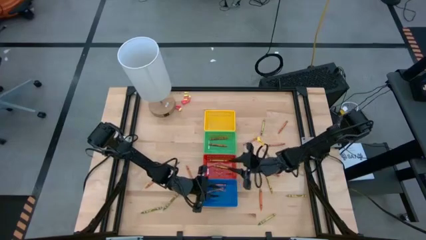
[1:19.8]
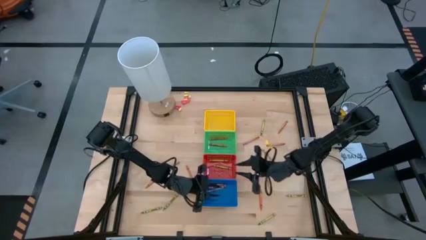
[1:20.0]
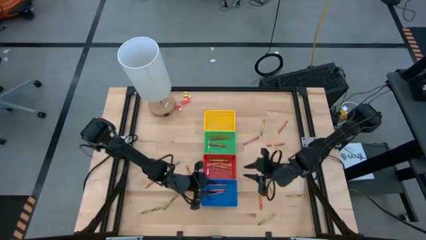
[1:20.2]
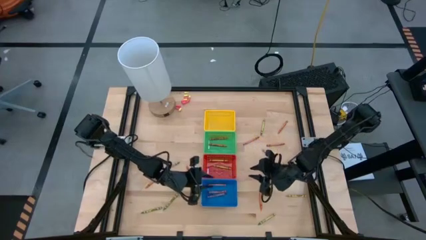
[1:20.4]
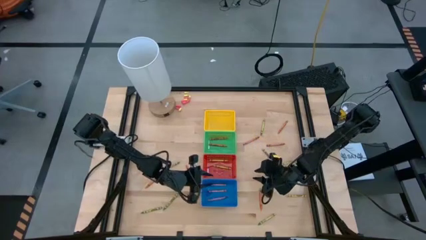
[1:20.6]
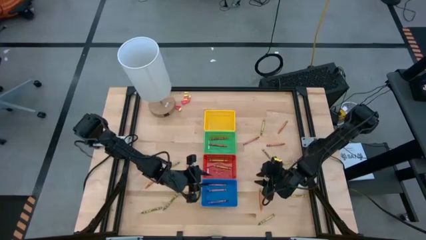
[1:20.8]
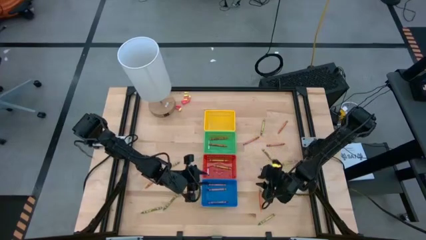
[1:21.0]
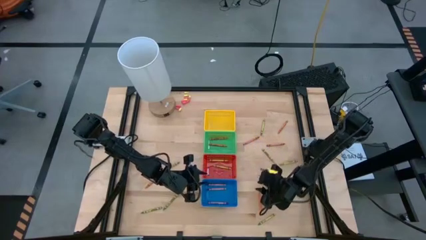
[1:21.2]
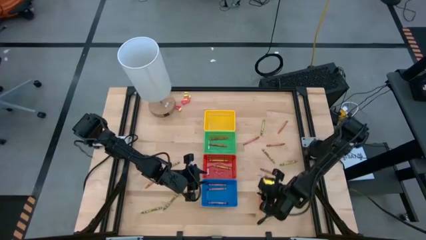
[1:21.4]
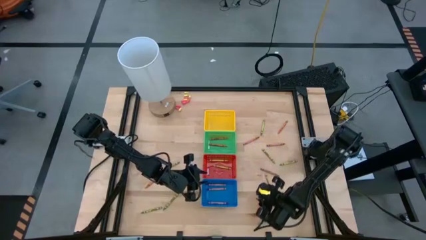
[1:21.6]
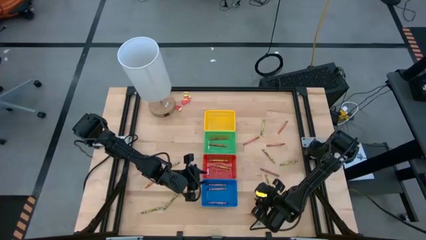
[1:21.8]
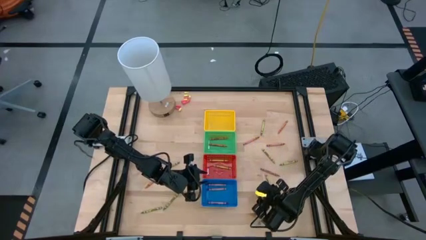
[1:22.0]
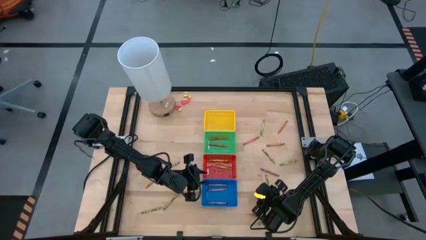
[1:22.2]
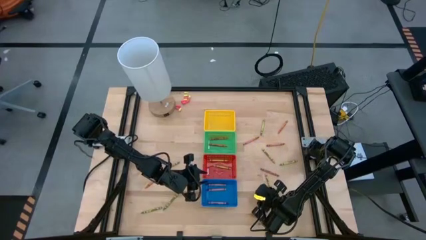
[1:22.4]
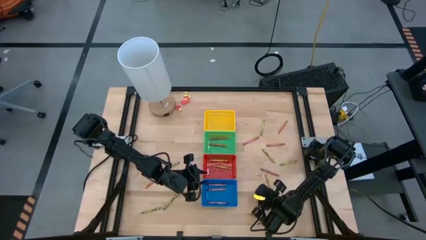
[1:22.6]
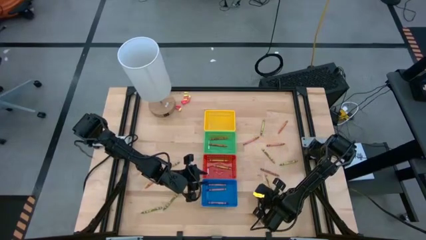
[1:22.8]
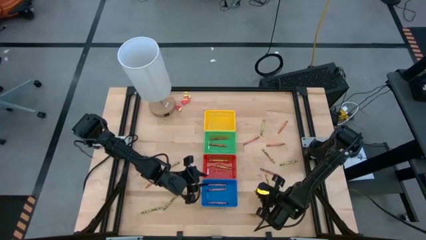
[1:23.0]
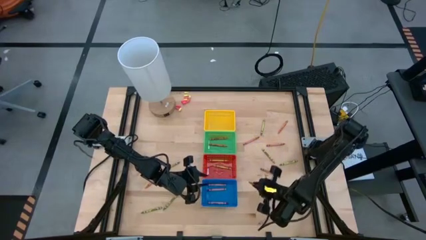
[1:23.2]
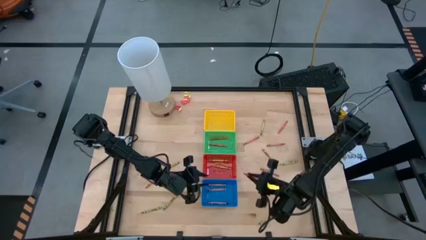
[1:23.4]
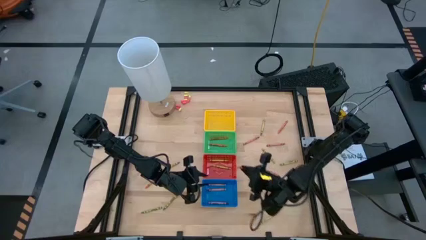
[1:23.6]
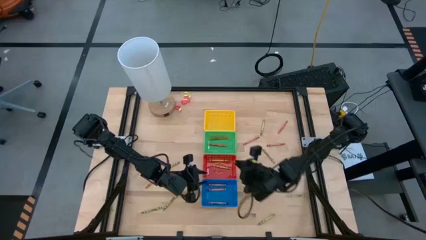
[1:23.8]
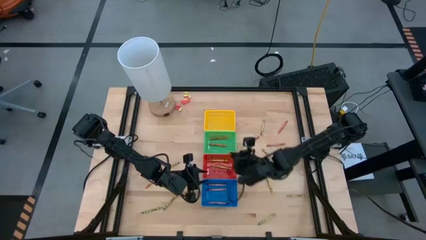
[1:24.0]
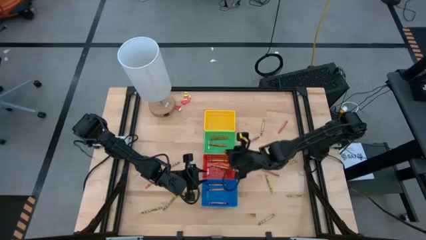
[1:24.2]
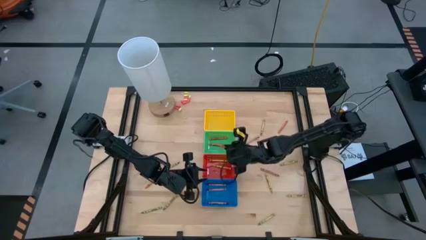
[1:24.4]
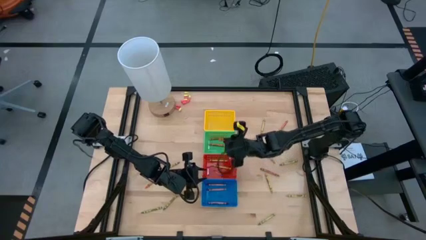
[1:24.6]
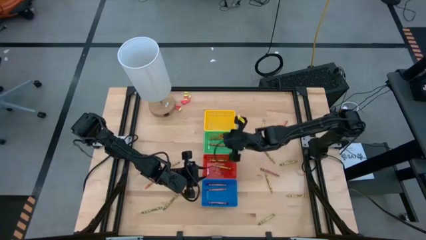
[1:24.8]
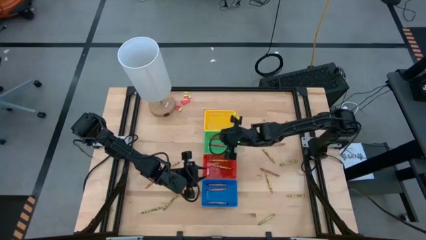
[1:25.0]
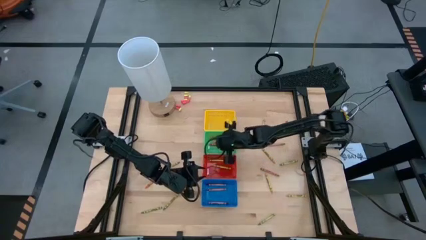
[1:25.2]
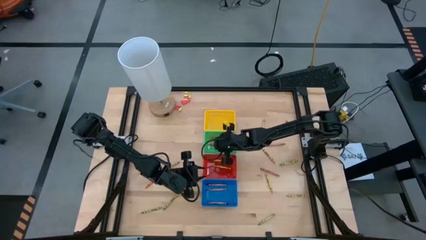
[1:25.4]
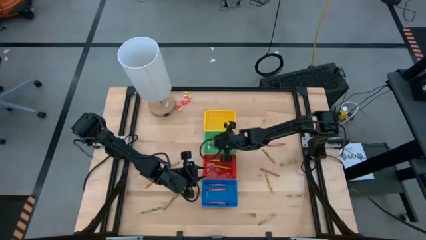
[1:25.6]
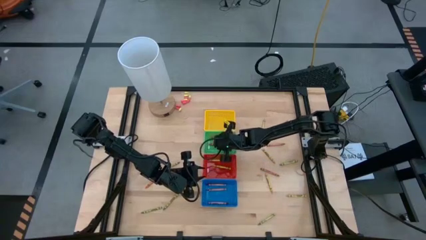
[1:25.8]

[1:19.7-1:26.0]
Task: Sort crayons
Put the orange crayon into the green bin

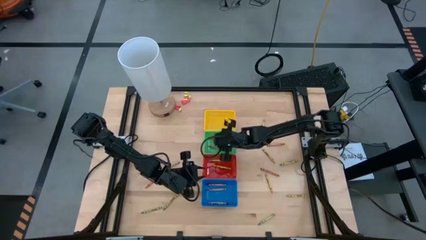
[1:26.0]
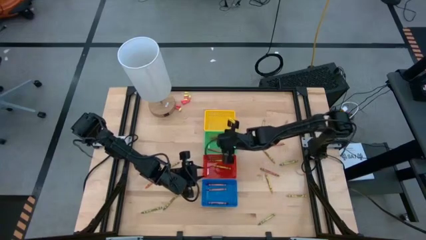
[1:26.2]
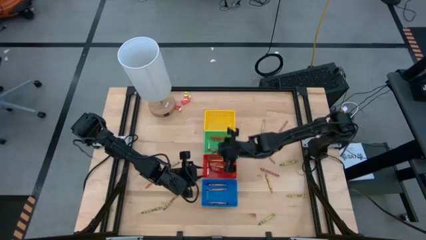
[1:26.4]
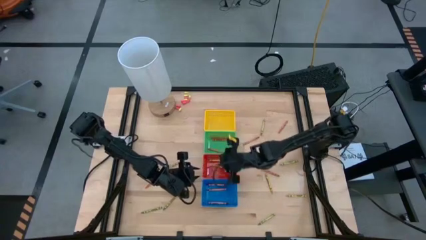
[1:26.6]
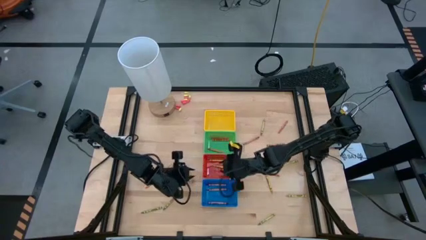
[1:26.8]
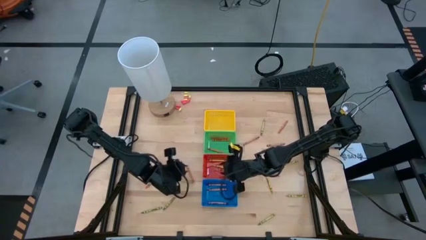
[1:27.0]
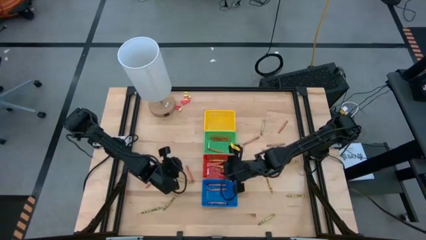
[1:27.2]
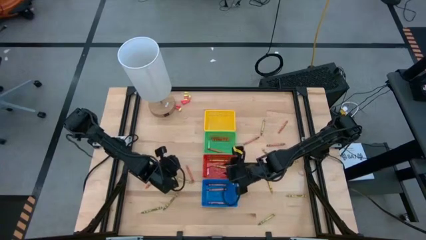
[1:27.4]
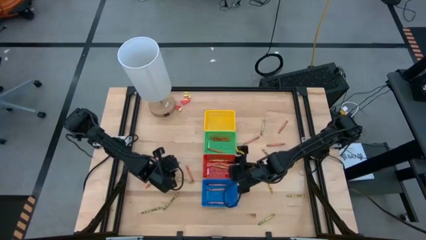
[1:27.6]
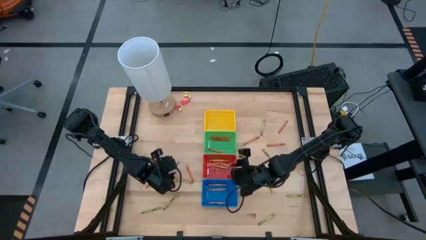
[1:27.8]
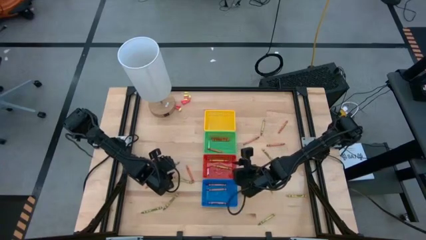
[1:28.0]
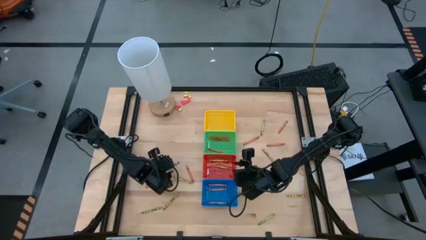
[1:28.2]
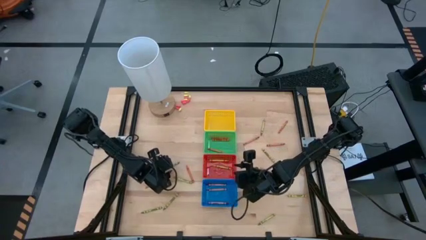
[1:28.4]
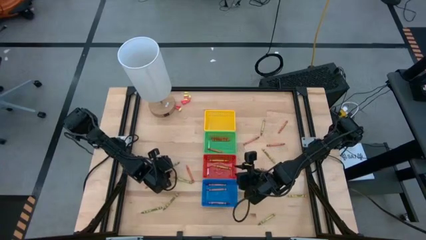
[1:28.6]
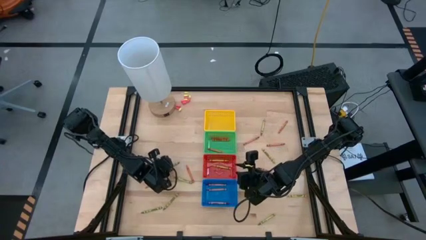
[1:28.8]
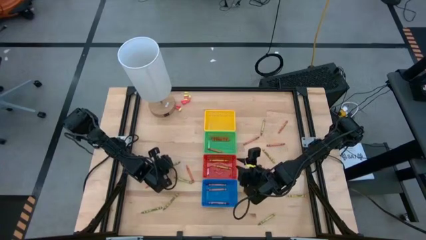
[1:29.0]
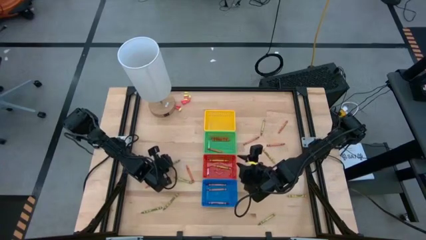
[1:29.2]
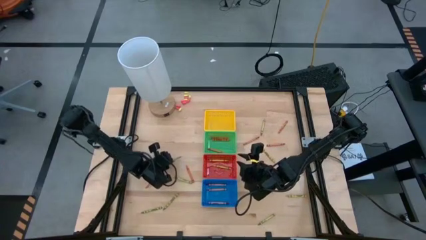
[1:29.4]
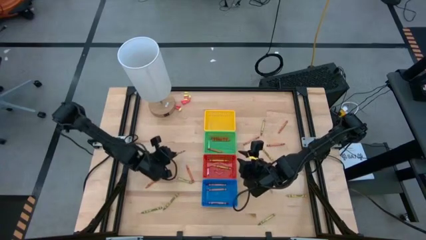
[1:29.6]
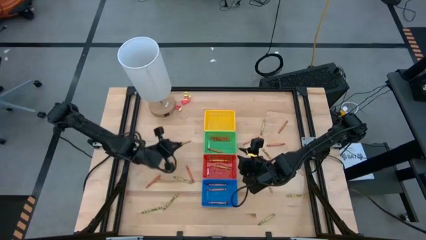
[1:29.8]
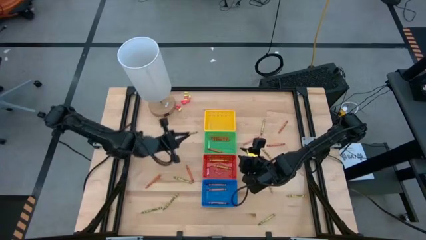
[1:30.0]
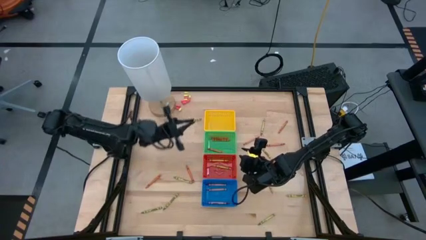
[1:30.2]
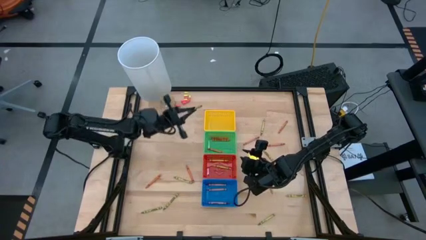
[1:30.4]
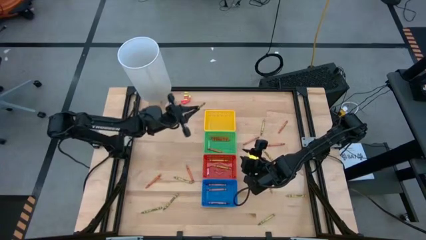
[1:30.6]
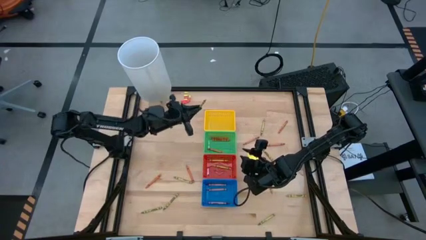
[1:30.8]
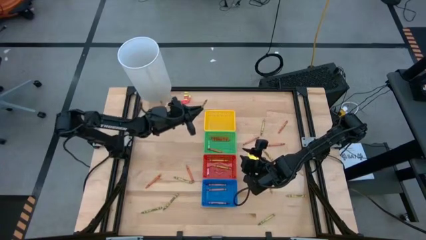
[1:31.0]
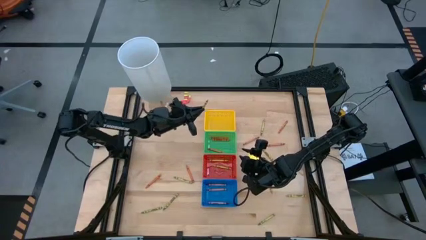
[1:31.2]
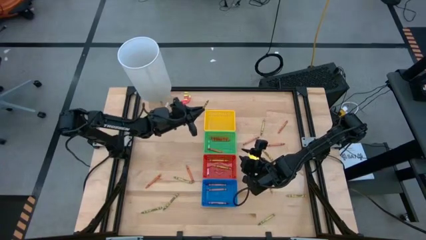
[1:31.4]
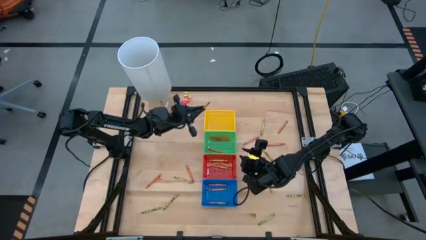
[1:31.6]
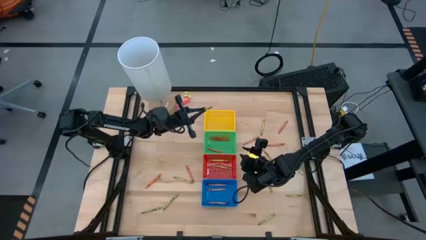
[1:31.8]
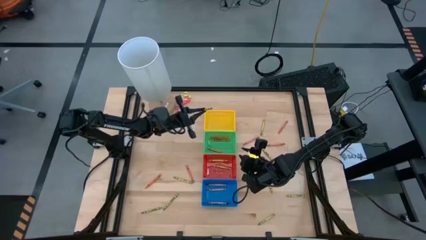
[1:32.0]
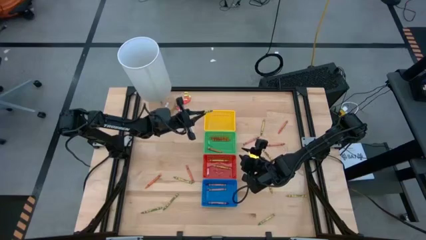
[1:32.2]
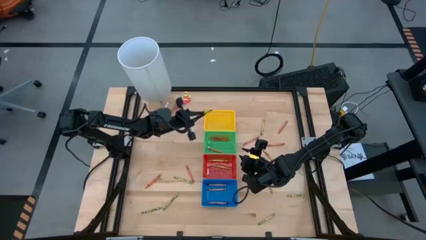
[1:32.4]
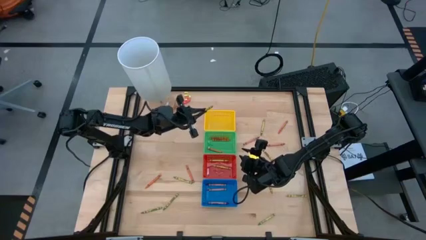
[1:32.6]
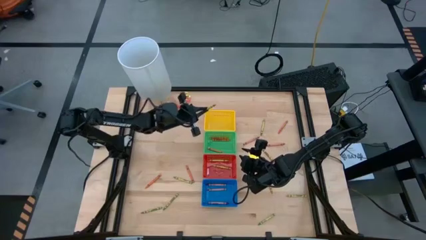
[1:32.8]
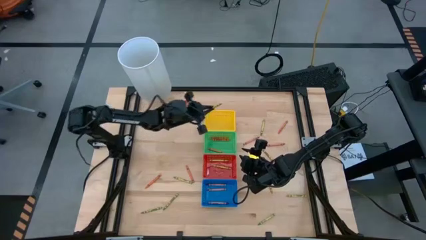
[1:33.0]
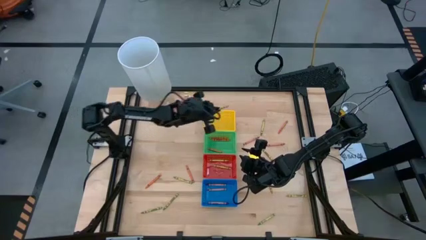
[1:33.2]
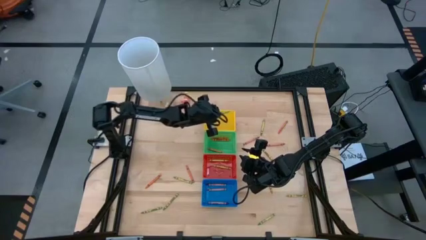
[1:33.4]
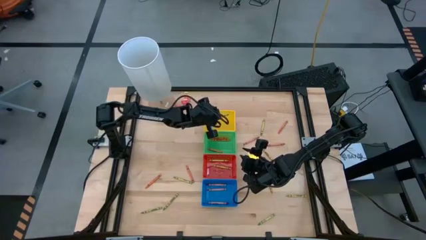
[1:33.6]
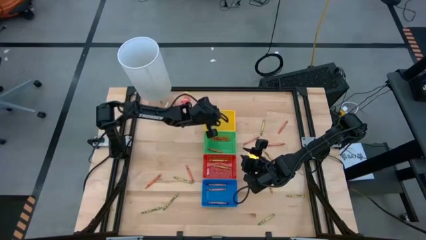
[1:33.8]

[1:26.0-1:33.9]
Put the green crayon into the yellow bin

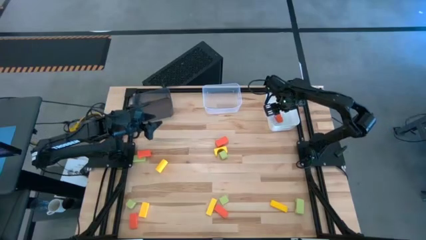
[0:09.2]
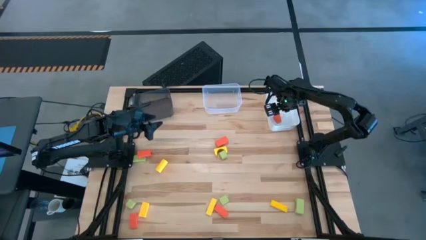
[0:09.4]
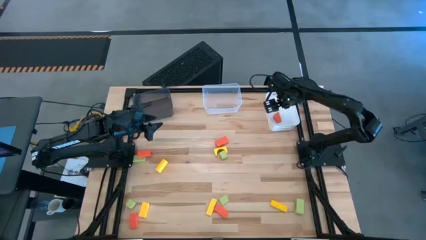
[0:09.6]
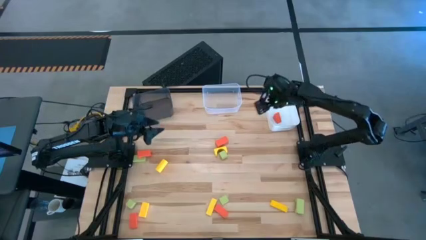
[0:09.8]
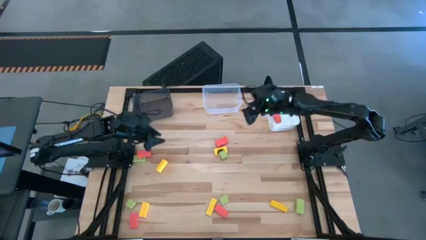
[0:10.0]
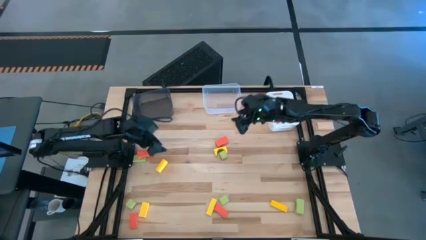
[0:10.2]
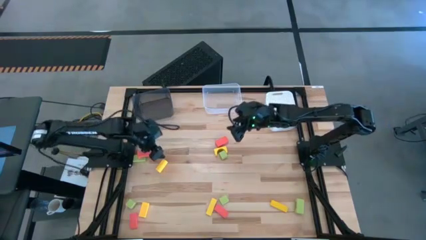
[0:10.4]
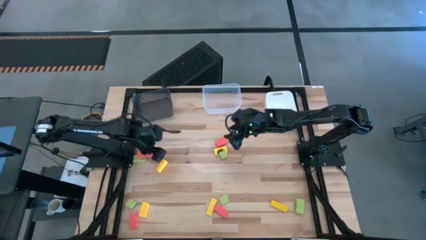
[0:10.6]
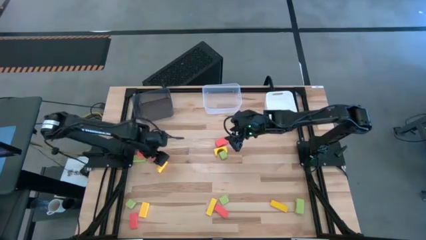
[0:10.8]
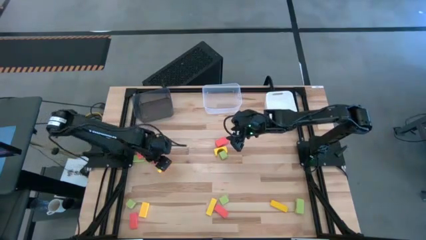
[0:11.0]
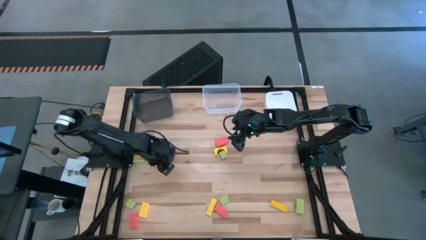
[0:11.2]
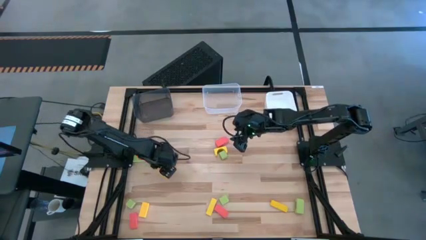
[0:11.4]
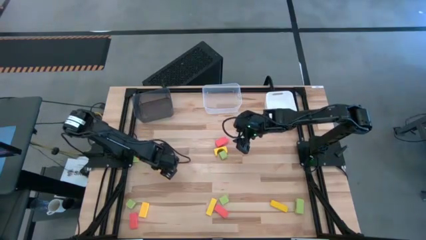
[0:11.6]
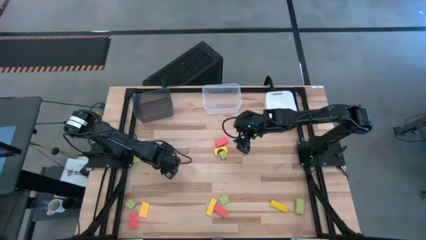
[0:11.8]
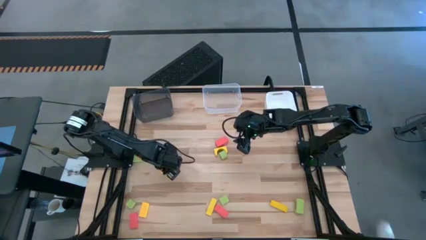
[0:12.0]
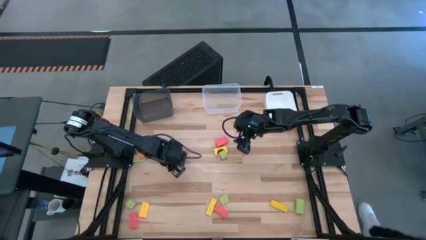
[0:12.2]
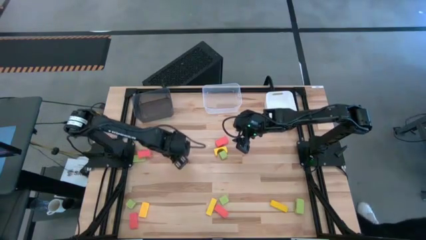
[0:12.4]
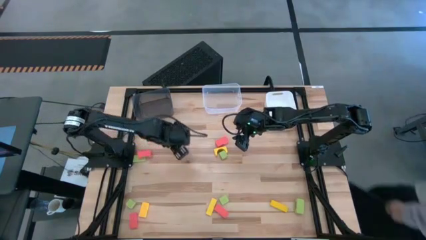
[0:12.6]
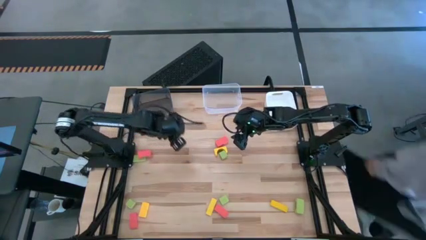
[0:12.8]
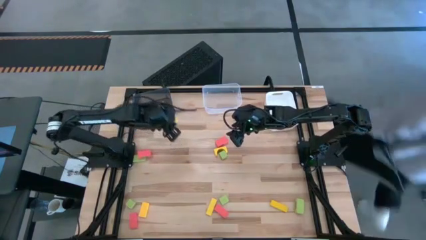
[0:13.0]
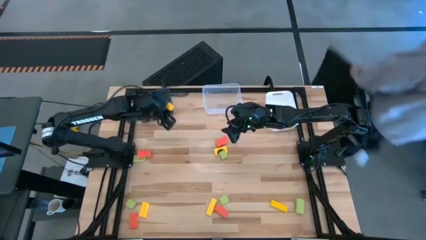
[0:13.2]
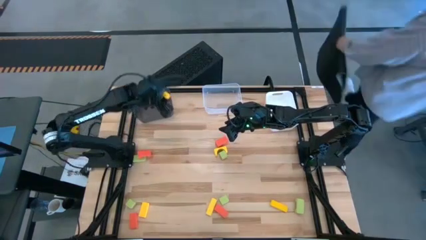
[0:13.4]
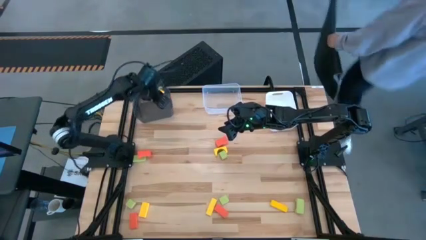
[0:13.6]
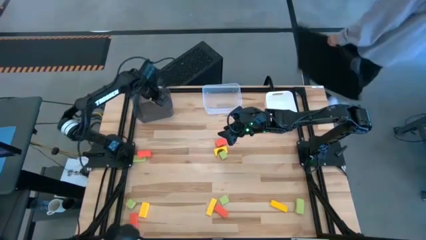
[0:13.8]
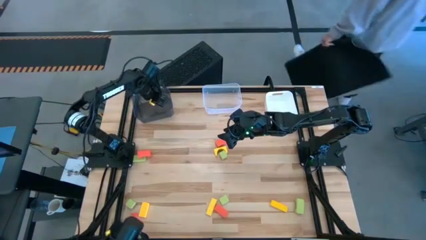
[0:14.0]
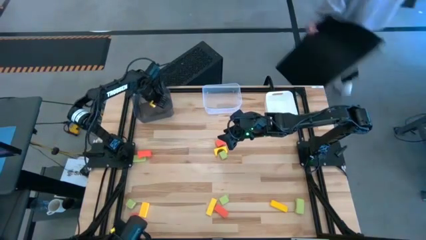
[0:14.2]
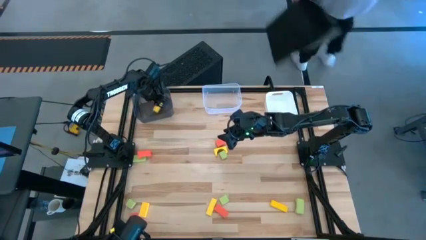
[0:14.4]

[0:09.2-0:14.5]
Task: Sort & place blocks by color
Put the yellow block into the black bin
